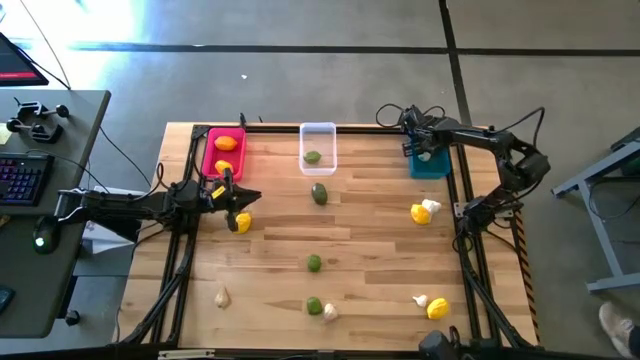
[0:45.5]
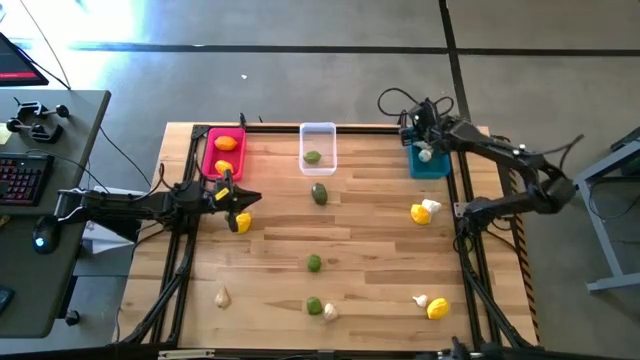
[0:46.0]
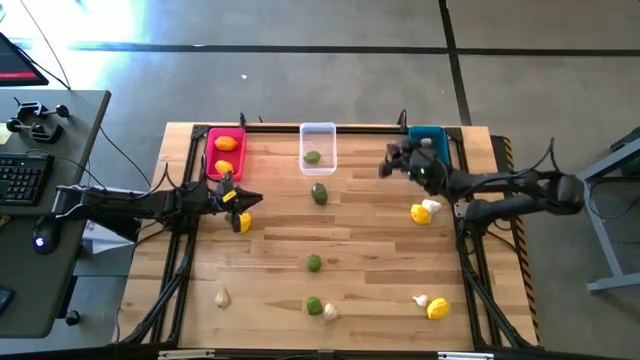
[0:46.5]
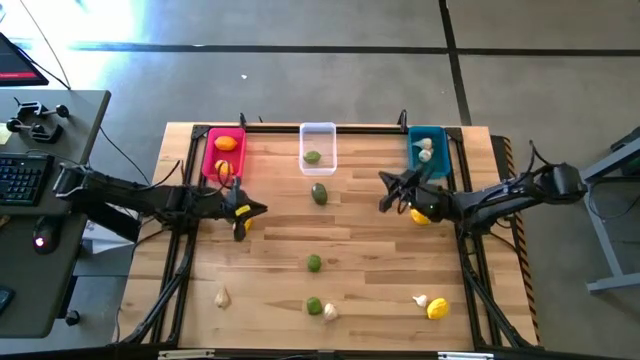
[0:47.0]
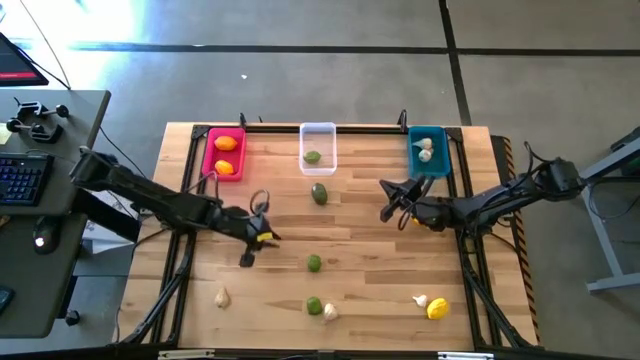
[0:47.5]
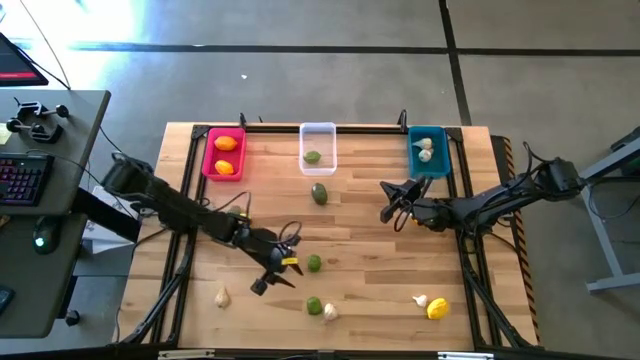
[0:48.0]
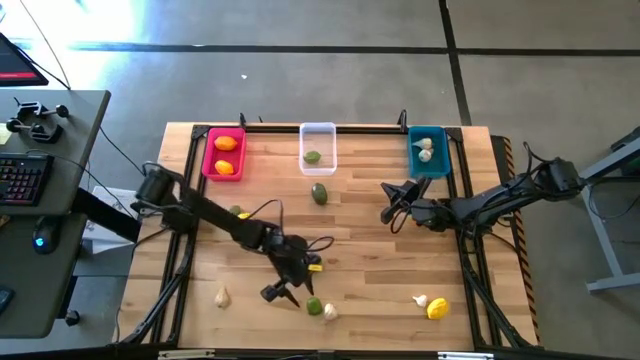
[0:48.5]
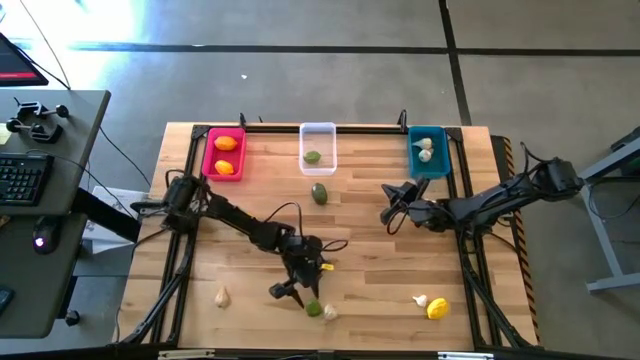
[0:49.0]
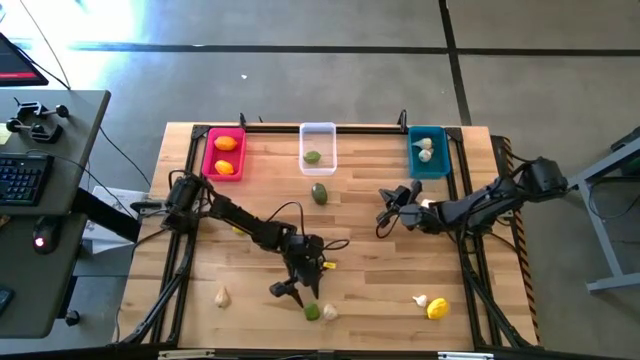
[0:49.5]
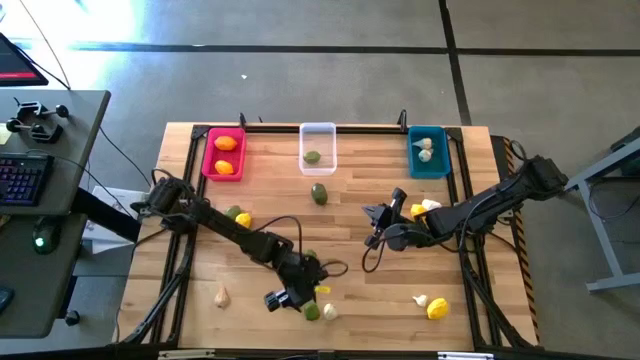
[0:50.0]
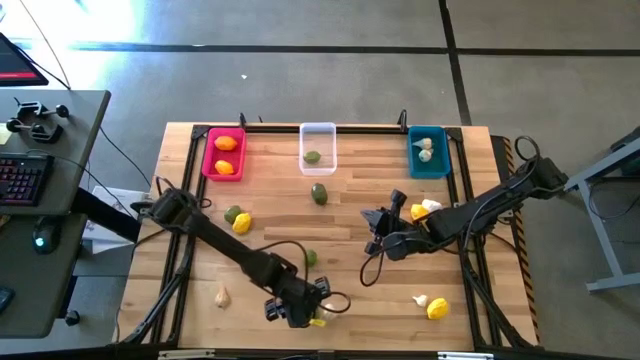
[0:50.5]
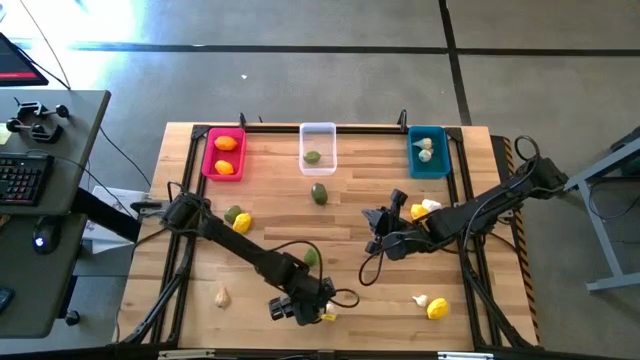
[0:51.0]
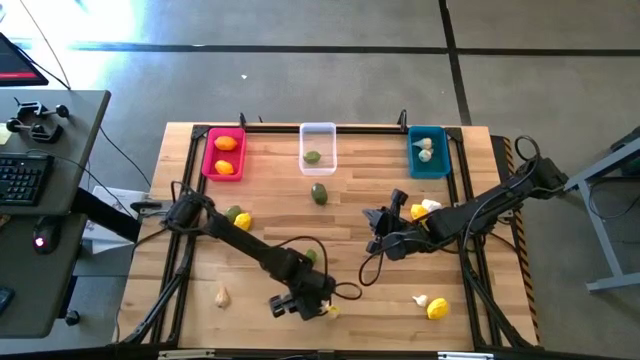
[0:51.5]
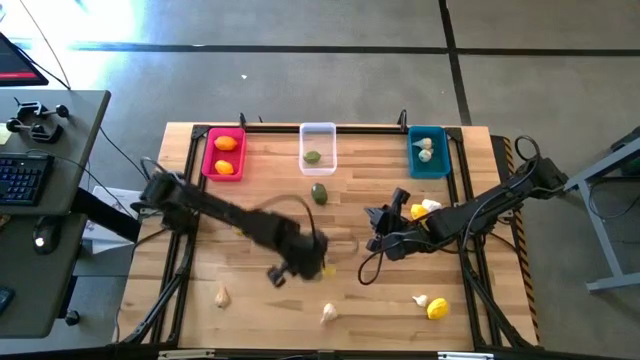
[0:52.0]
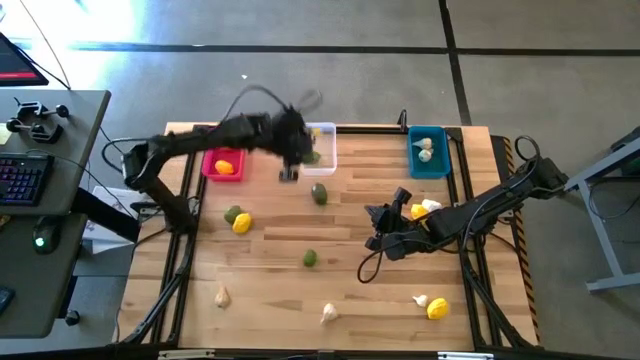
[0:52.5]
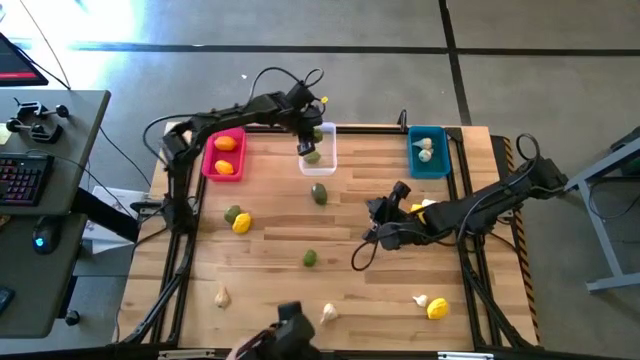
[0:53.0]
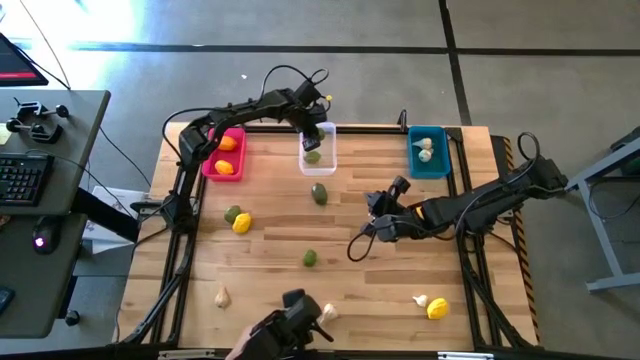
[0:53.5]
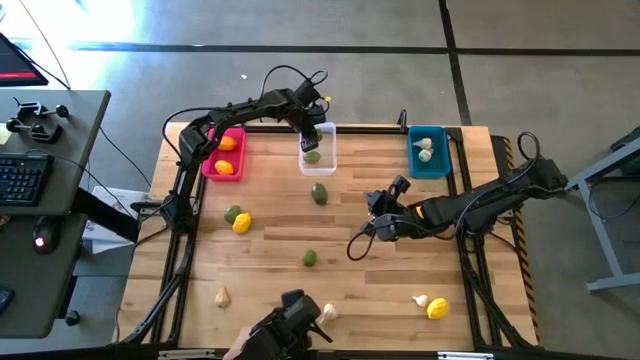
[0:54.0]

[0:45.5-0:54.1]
Task: Sort produce into baskets
Put the lime into the white bin

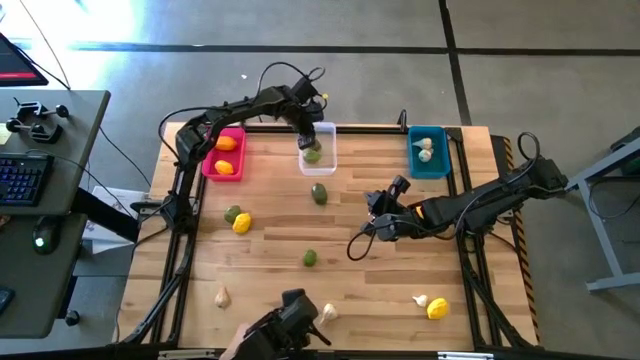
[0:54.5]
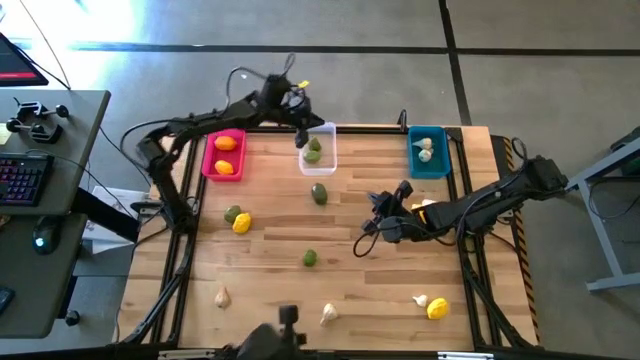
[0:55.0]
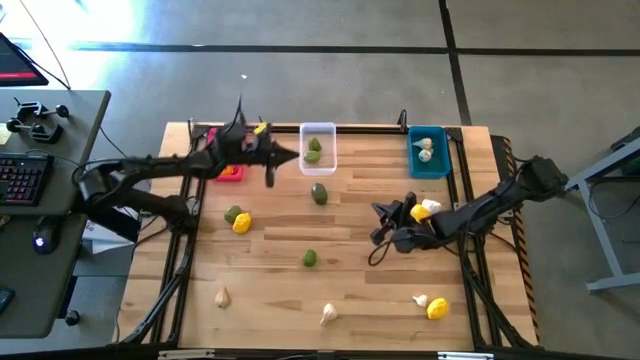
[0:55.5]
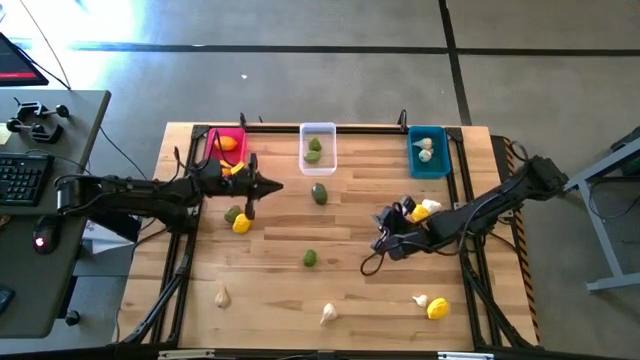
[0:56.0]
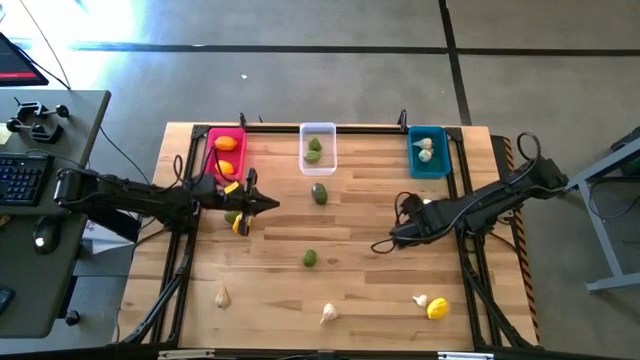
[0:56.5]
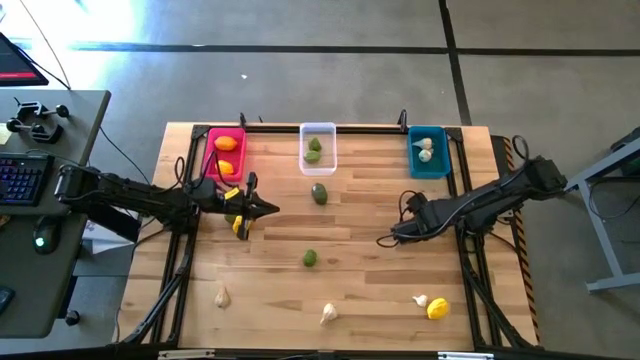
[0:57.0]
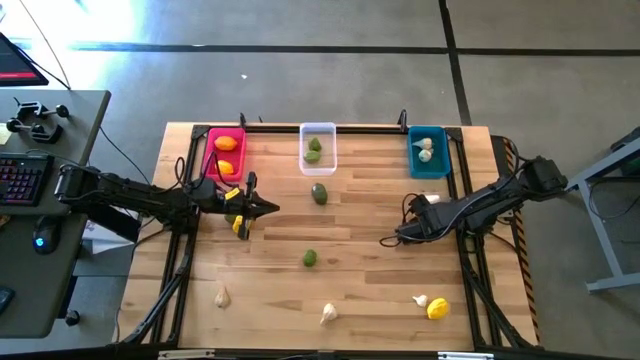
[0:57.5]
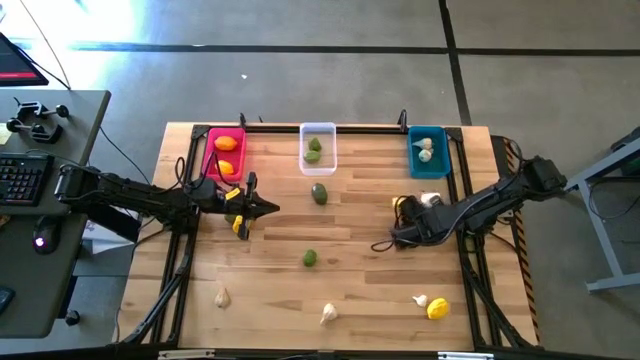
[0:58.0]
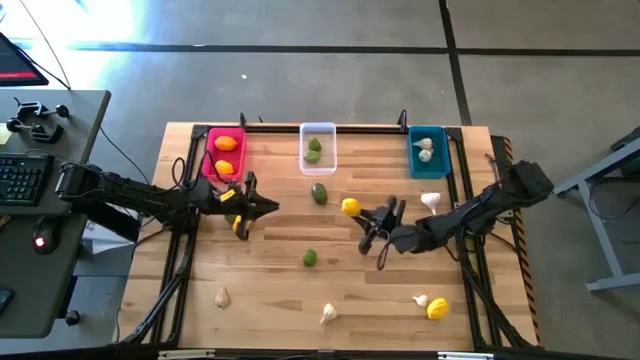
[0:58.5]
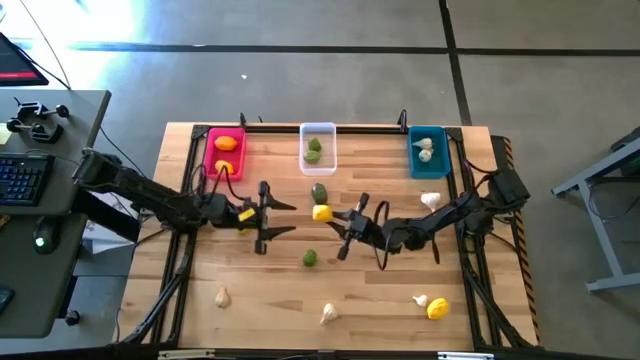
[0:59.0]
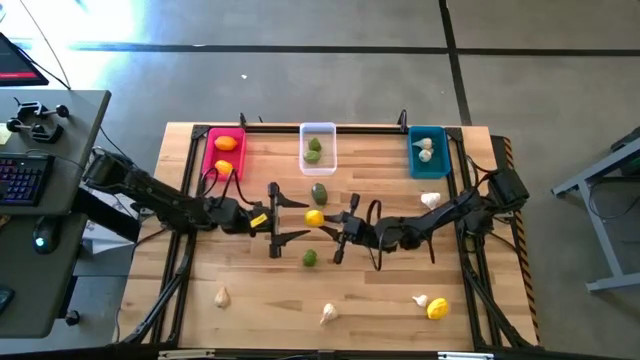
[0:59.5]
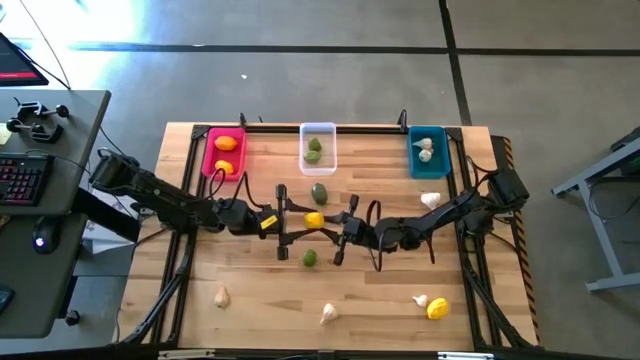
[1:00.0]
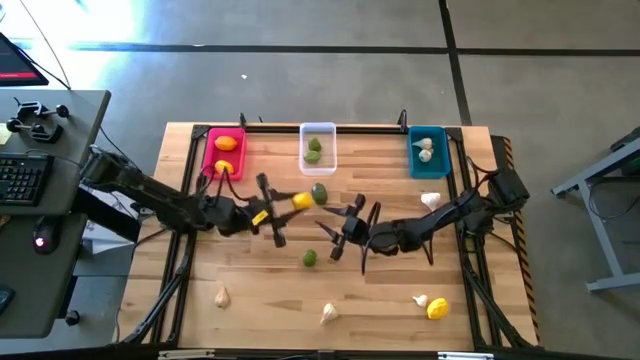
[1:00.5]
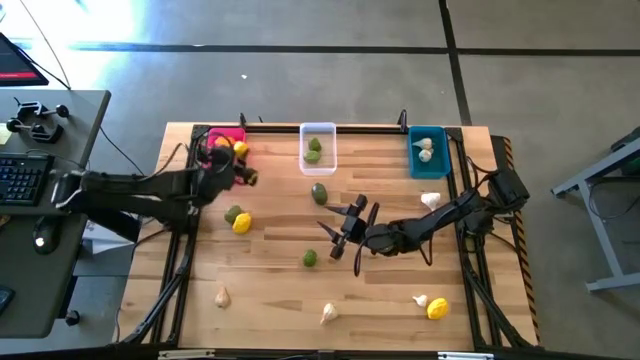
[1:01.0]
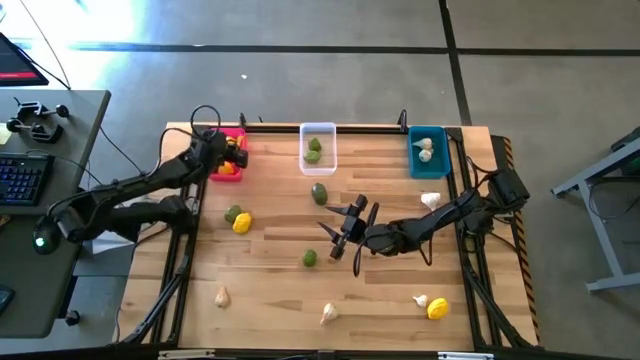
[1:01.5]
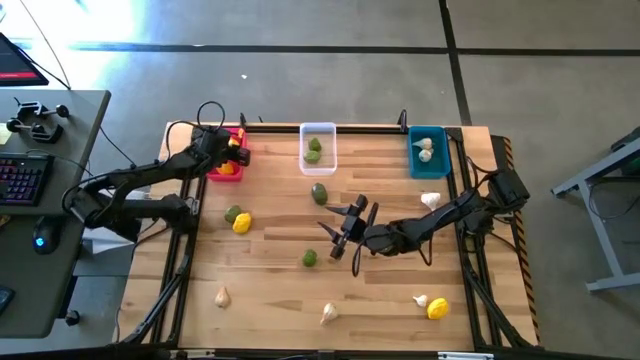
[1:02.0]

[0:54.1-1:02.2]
Put the lemon into the pink bin

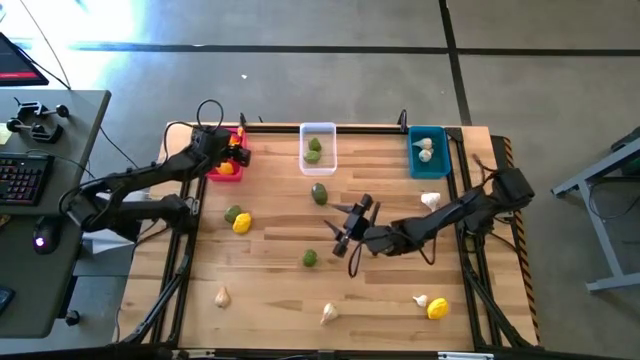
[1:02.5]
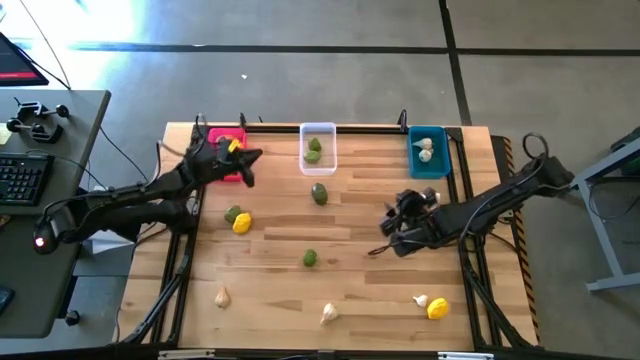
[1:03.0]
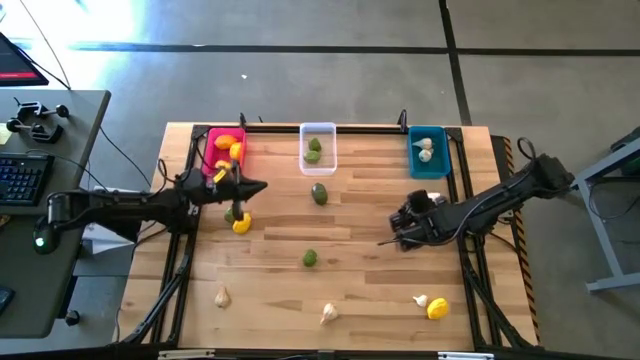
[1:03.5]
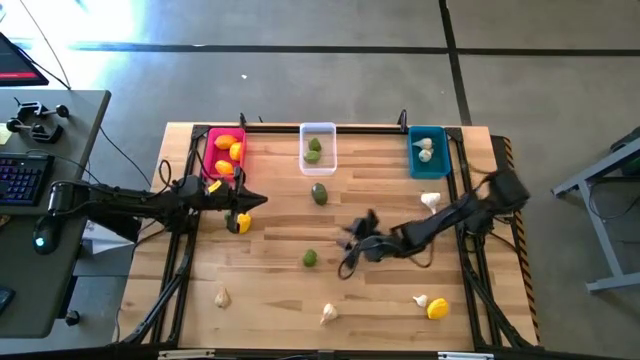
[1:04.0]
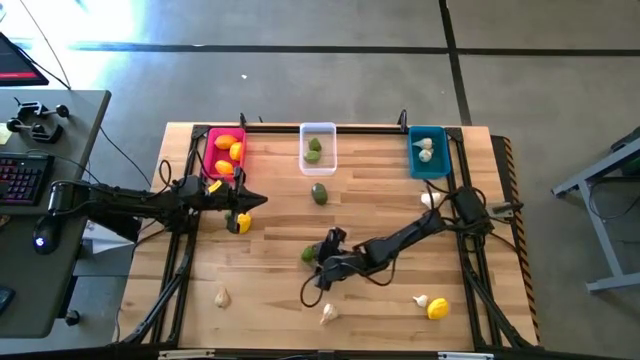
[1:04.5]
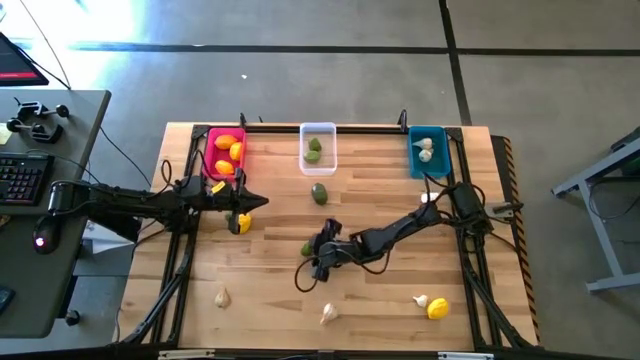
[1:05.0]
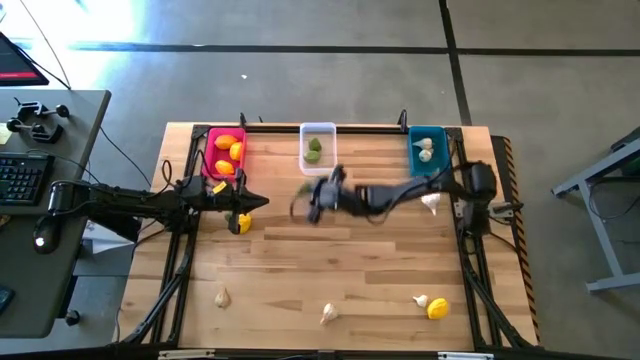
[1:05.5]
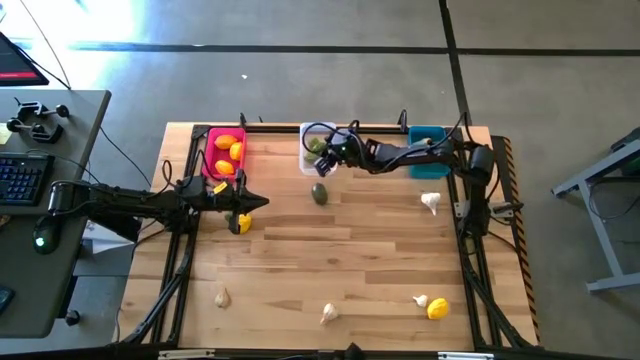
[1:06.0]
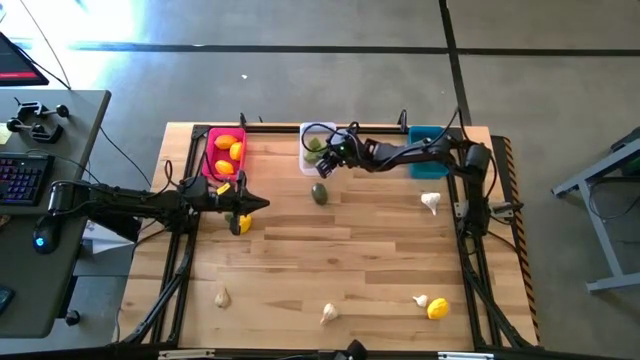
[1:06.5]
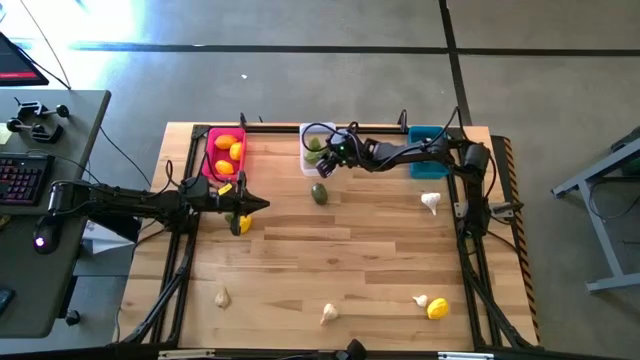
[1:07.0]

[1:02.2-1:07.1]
Put the lime into the white bin
